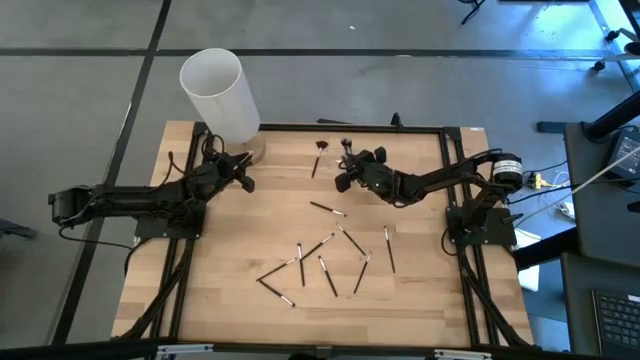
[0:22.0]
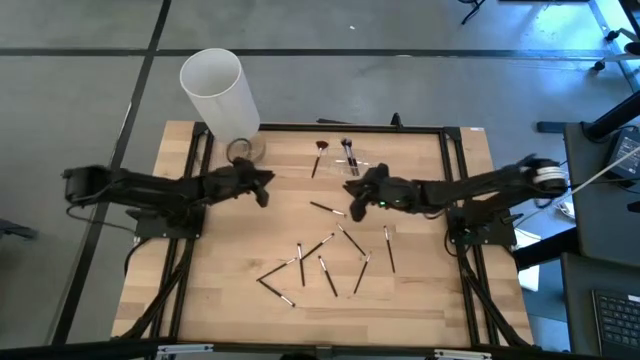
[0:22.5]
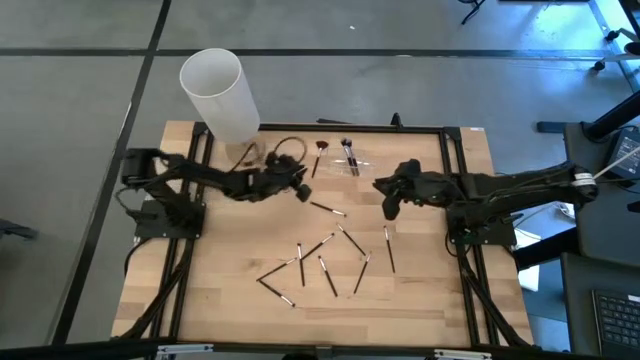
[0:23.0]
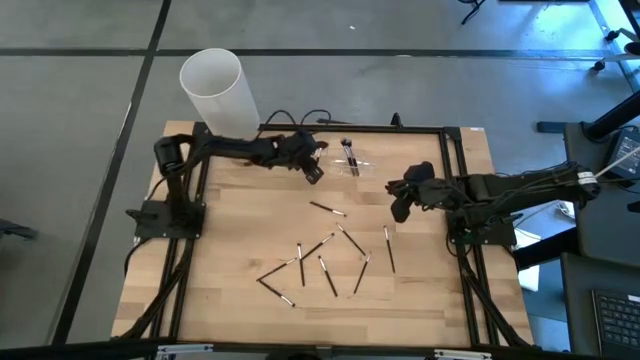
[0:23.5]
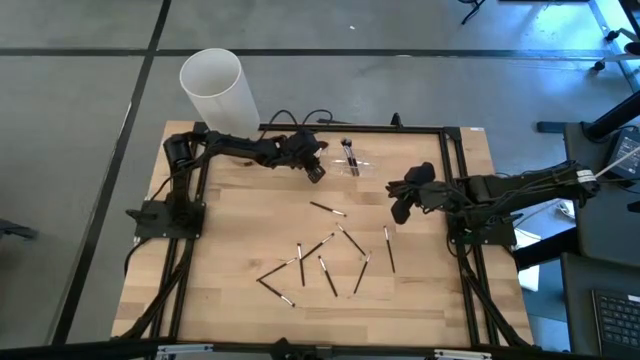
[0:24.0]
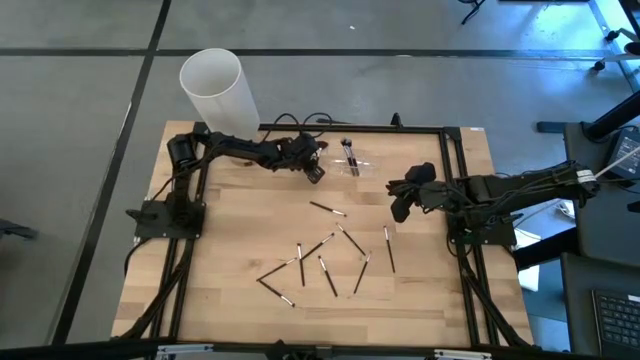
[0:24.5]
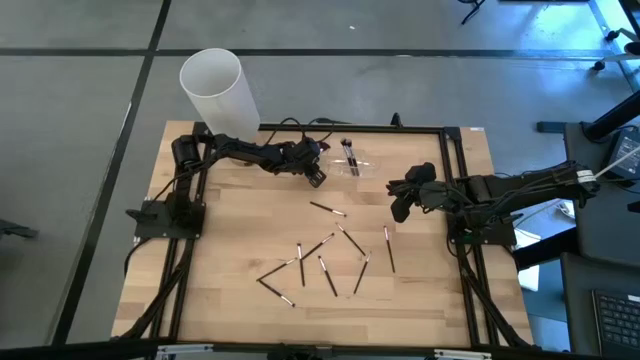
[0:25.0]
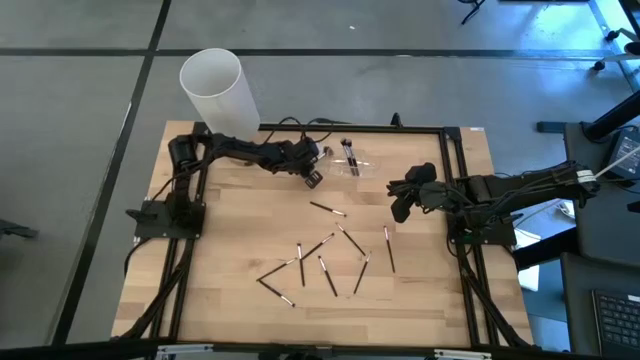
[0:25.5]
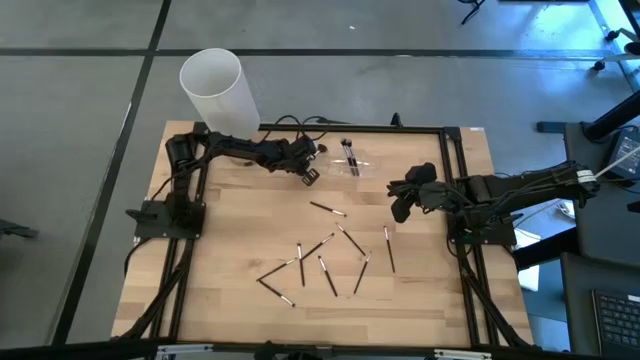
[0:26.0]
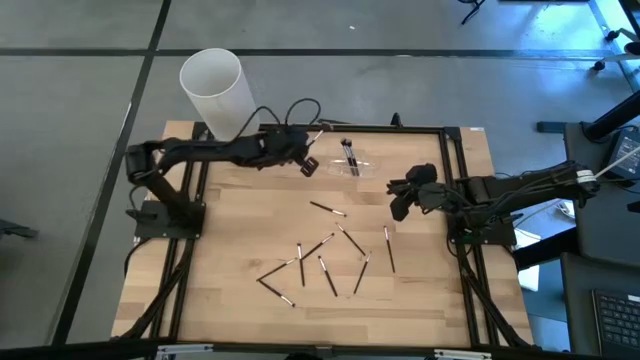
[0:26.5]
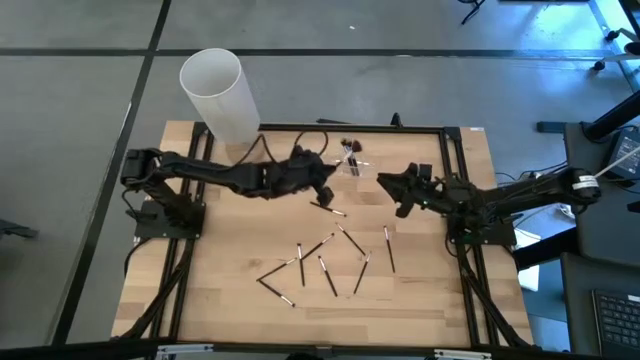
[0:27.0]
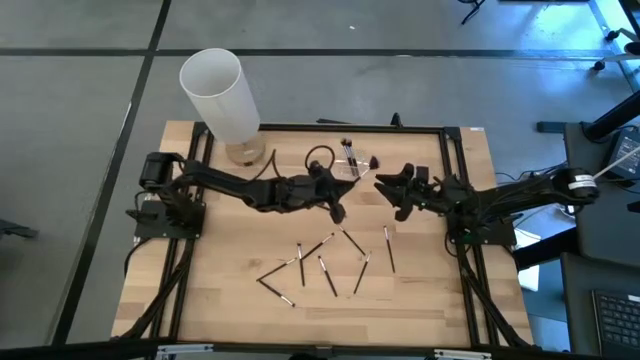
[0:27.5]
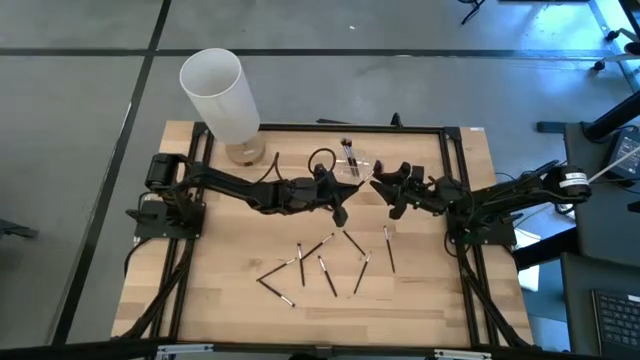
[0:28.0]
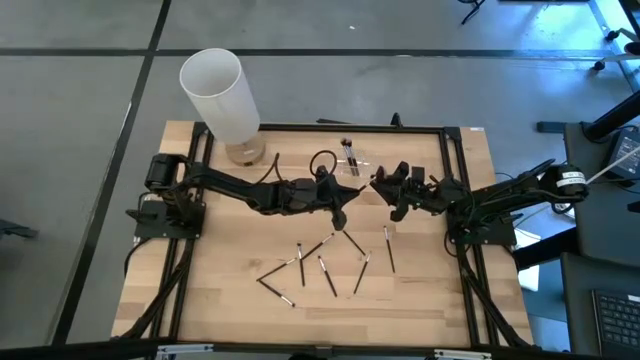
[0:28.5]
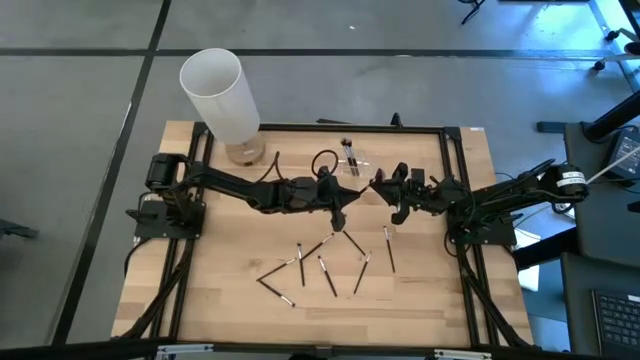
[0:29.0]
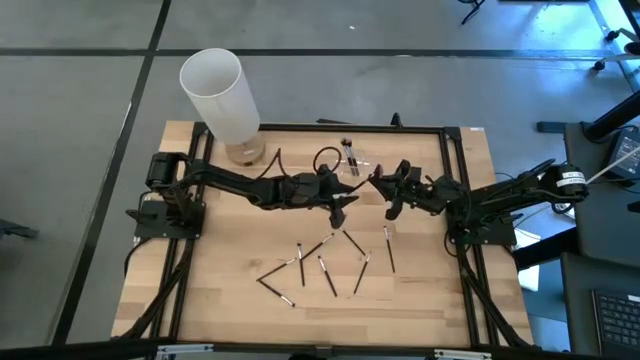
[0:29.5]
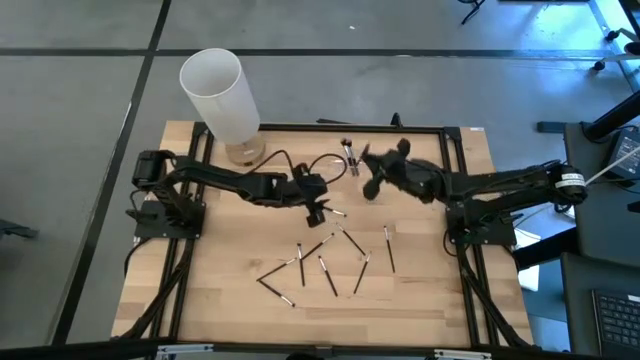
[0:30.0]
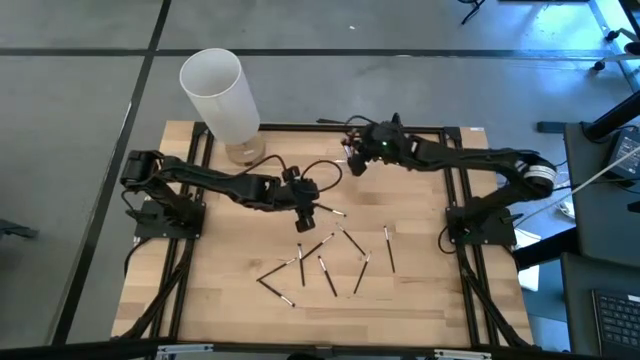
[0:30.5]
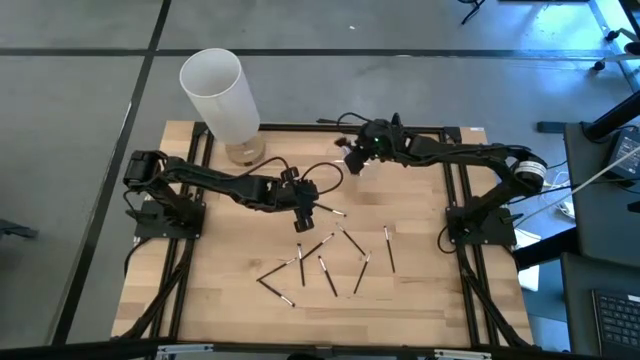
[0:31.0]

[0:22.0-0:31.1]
Task: Put items in baskets/containers
Put the black highlighter brush into the transparent organizer

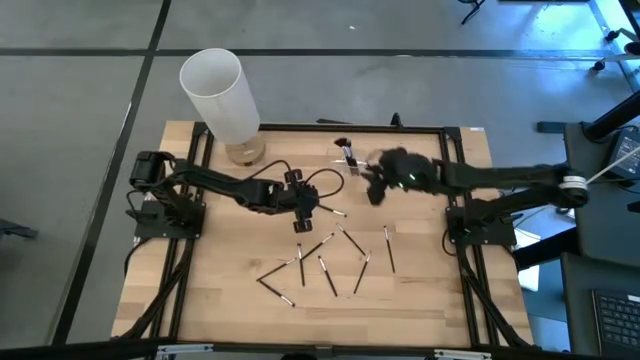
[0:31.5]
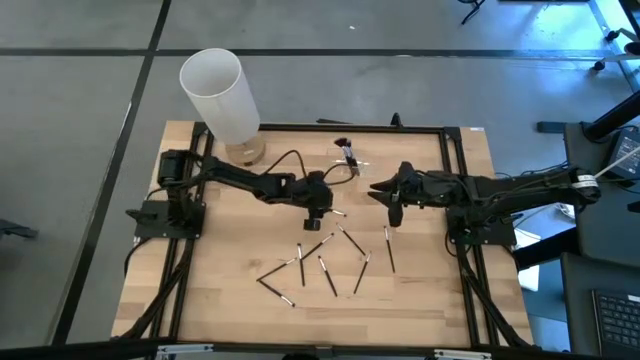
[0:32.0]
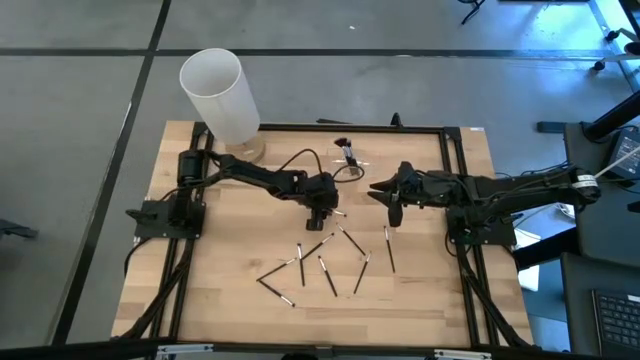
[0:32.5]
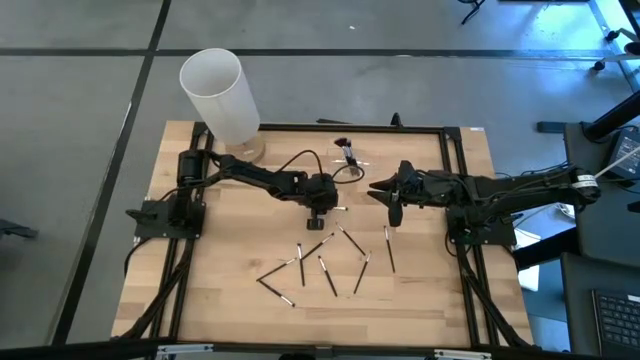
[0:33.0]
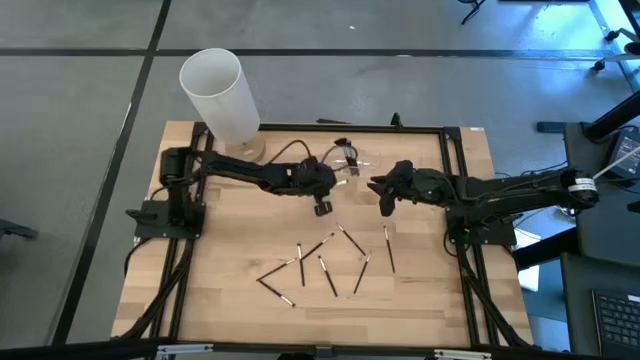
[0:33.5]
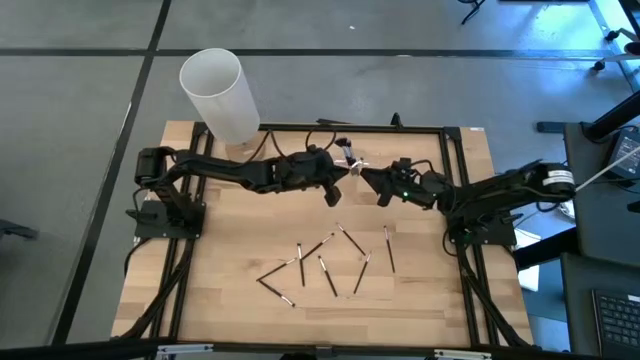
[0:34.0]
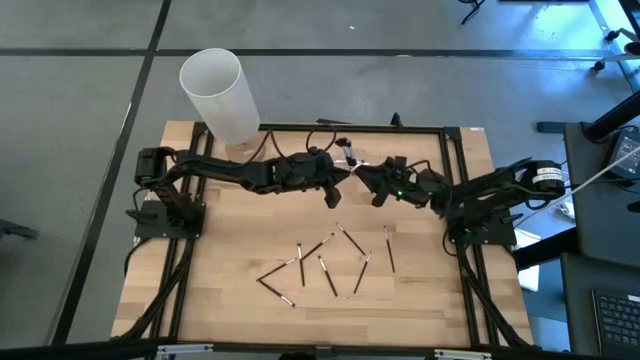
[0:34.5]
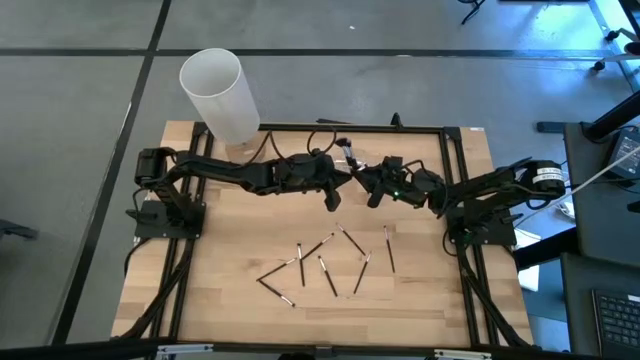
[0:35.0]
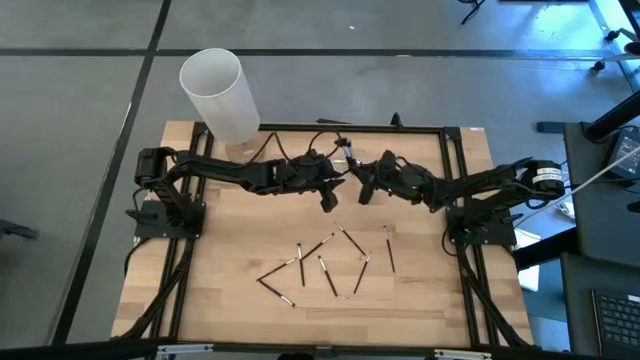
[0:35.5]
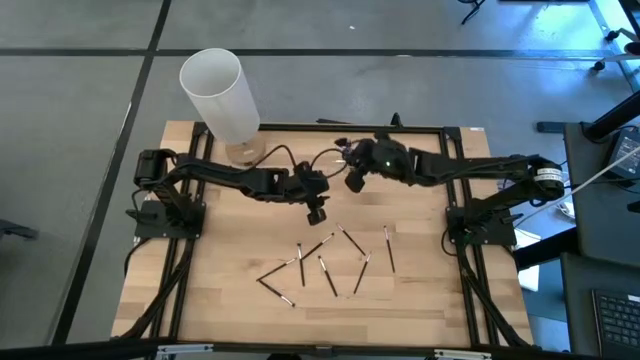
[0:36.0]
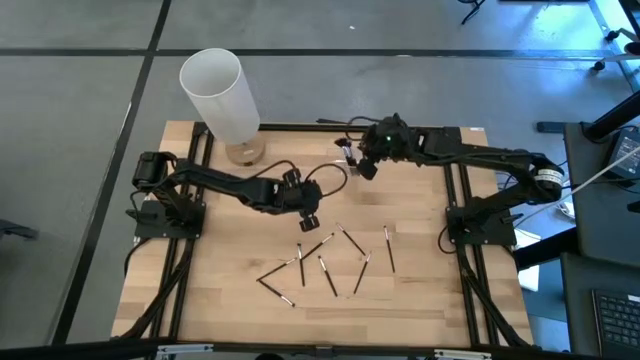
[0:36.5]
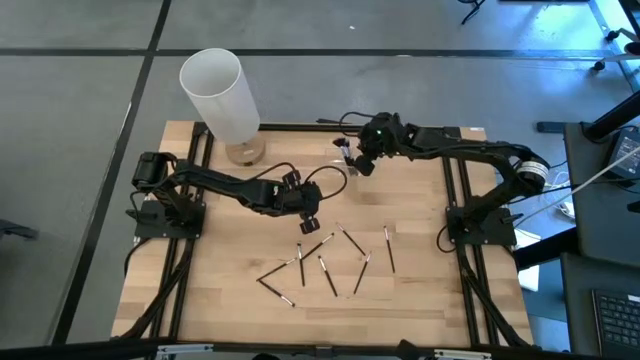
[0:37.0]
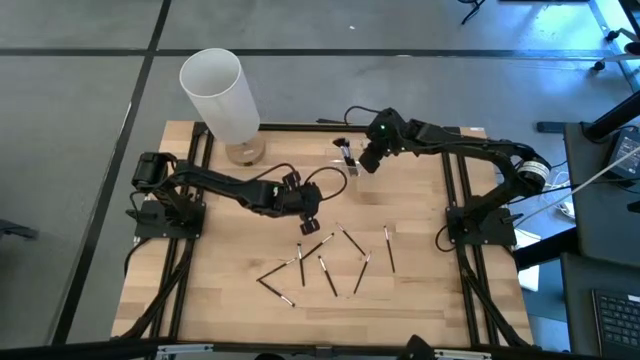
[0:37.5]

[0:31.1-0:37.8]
Put the black eyeshadow brush into the transparent organizer

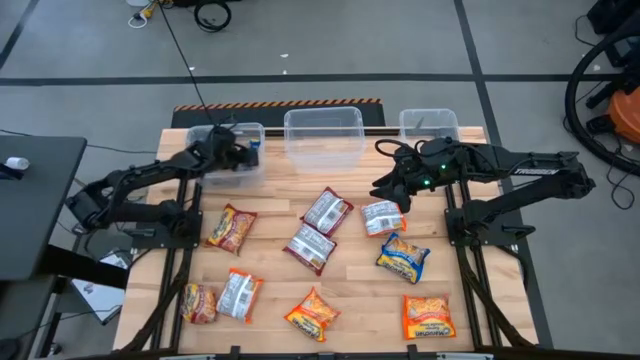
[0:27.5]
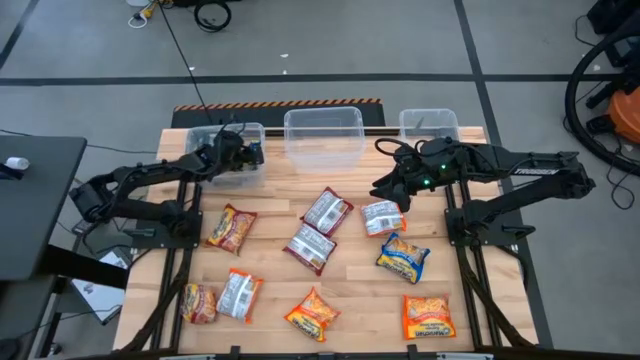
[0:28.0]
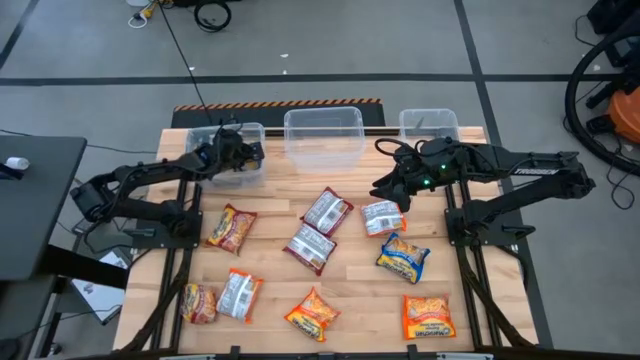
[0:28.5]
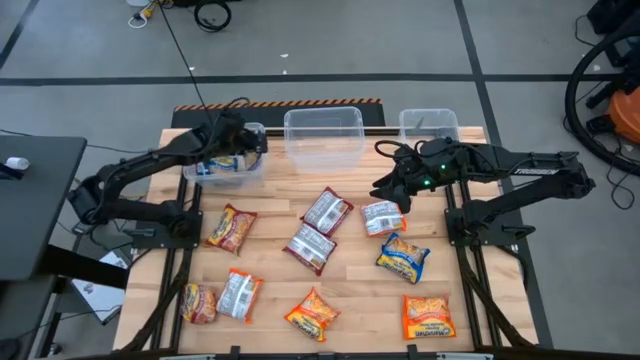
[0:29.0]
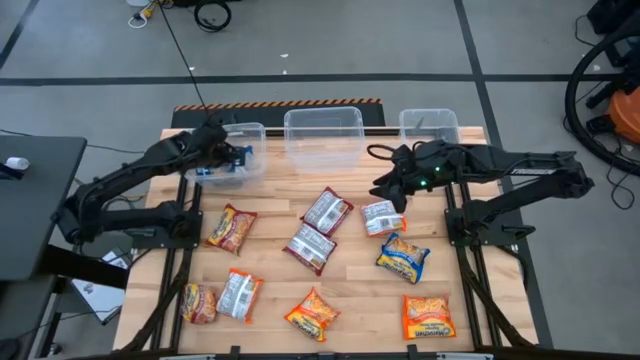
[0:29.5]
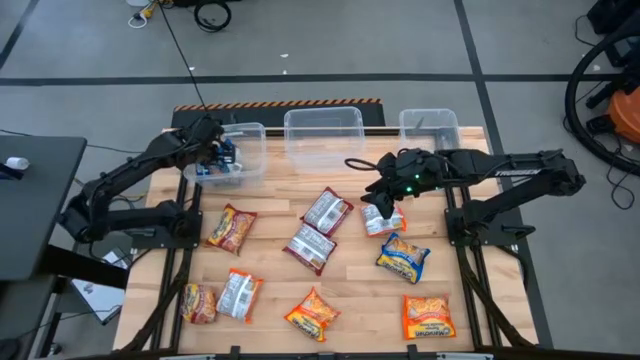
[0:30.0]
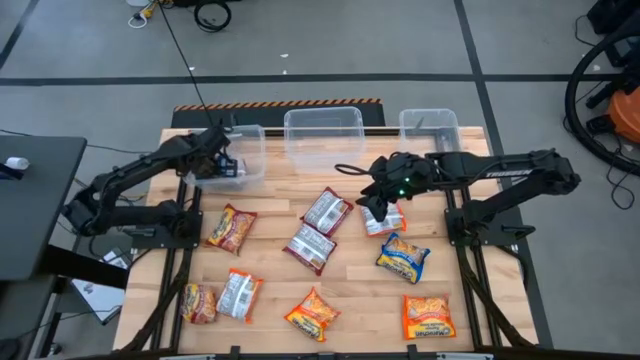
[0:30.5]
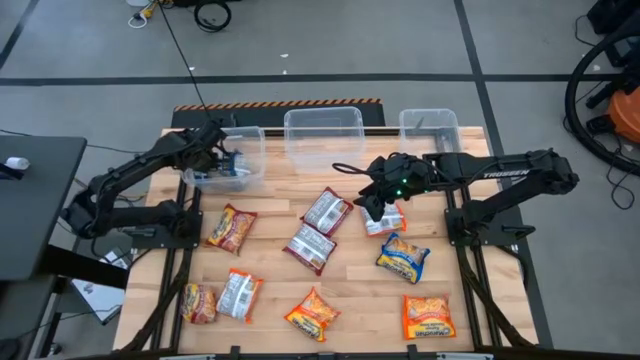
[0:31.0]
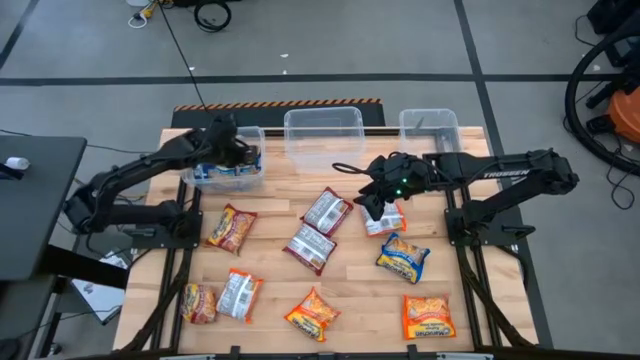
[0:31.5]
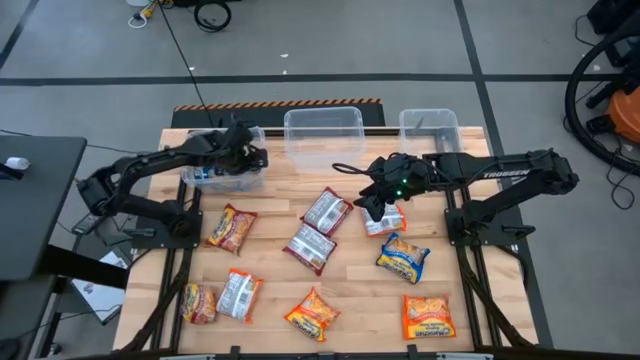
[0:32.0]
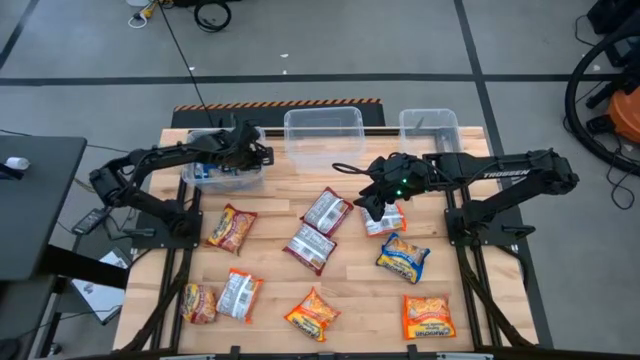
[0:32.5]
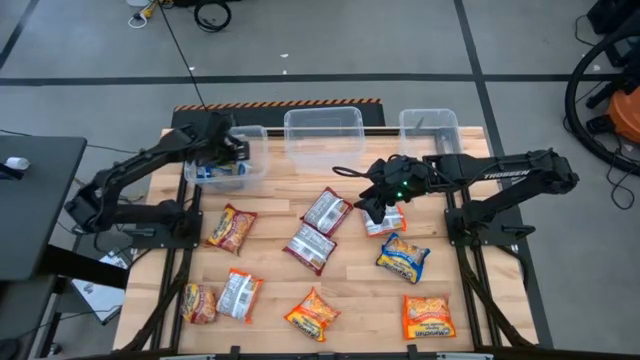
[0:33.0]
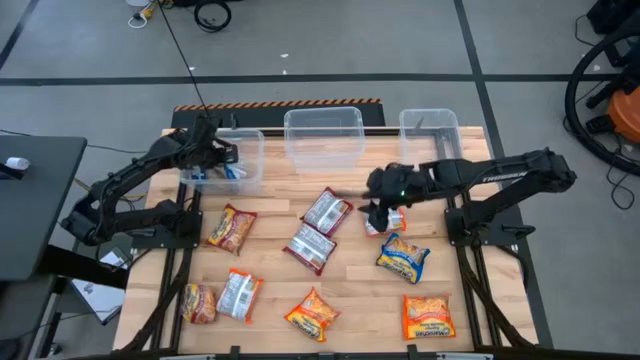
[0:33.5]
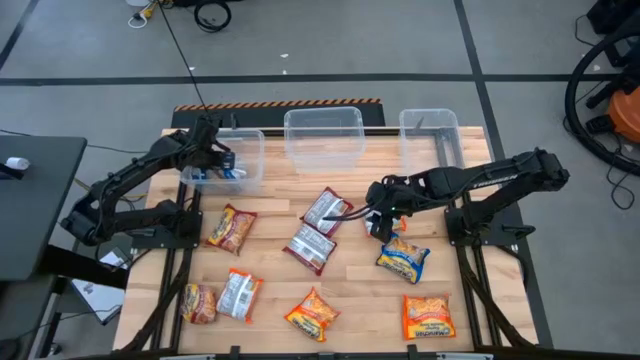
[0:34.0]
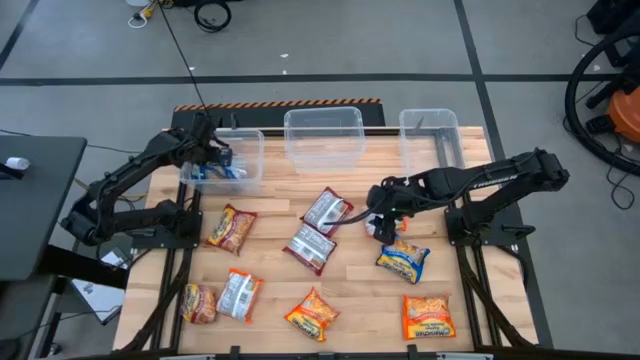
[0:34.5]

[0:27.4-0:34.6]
Task: Sort Maruchan noodles
Adjust the right blue noodle in the left transparent bin
